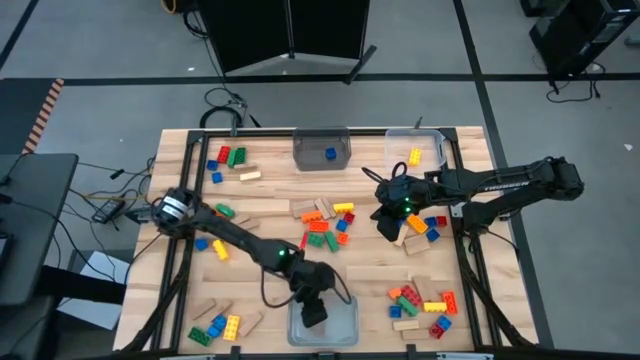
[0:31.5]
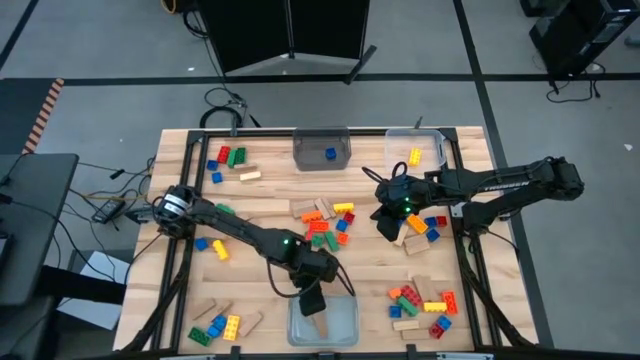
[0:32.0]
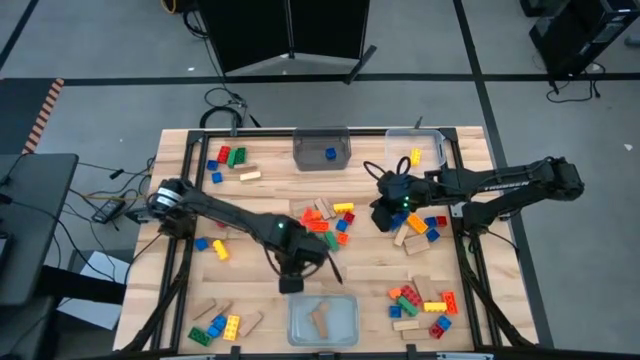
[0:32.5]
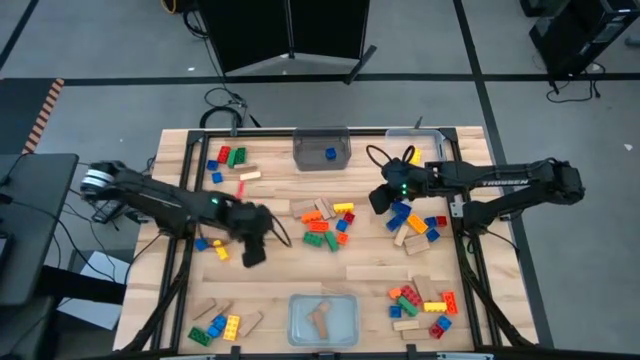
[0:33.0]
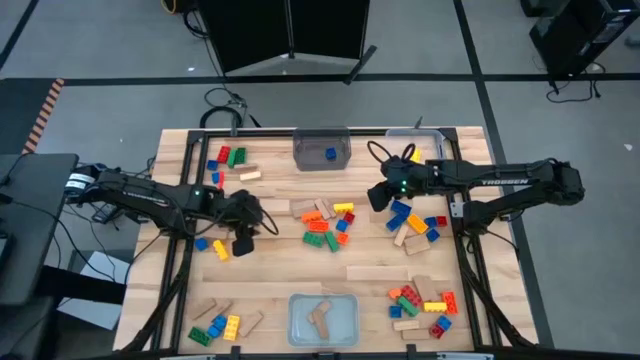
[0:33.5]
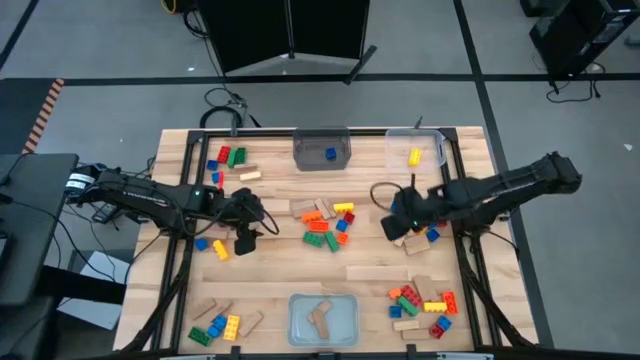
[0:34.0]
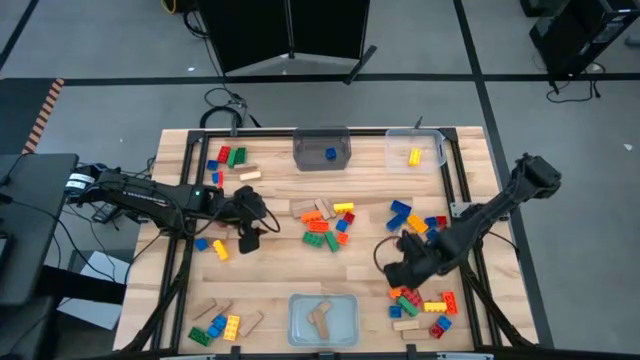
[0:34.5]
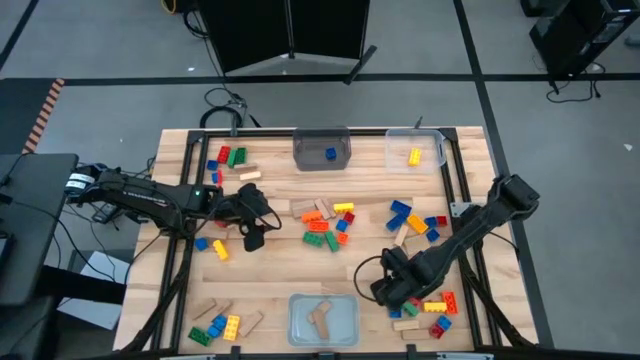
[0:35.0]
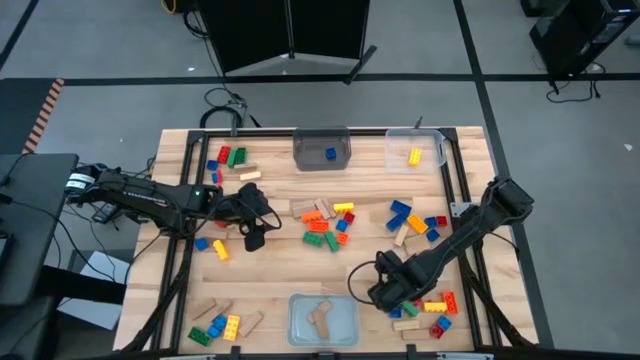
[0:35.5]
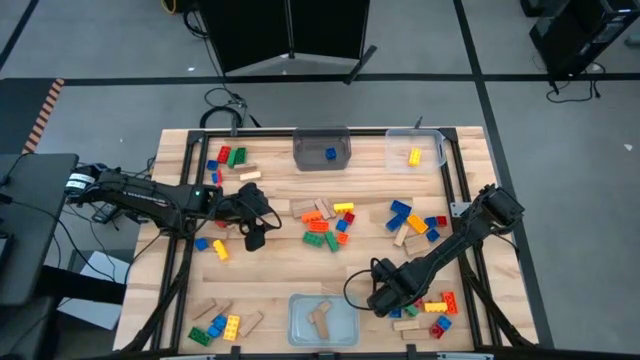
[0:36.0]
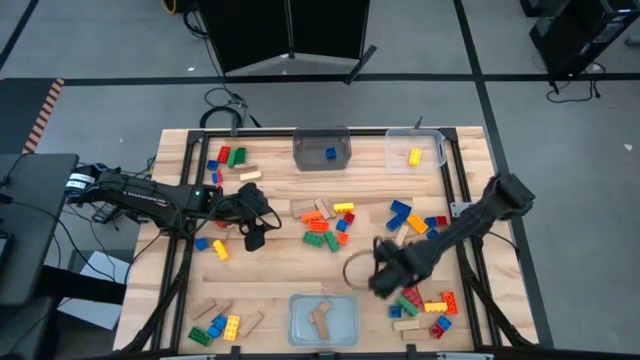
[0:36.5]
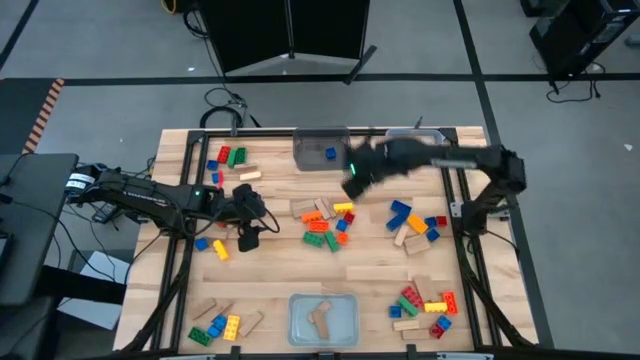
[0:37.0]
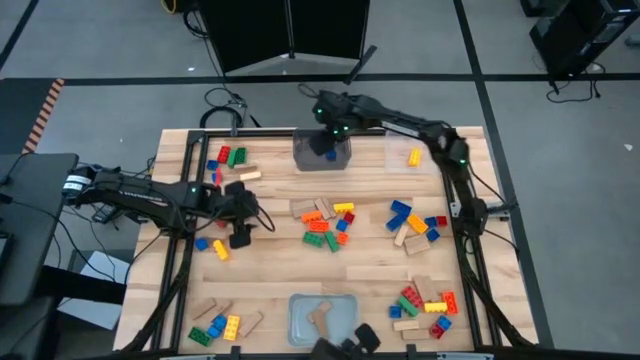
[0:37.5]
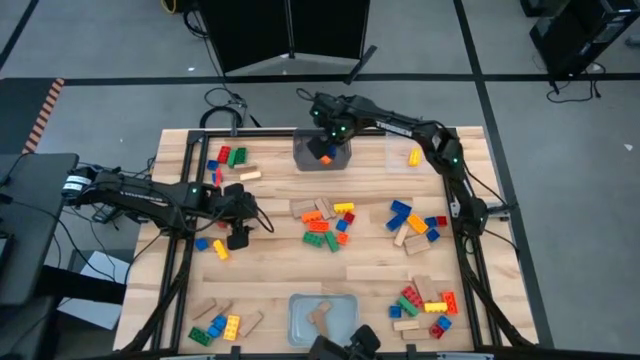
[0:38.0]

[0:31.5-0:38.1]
Task: Sort blocks by size
Put the small orange game piece into the black bin

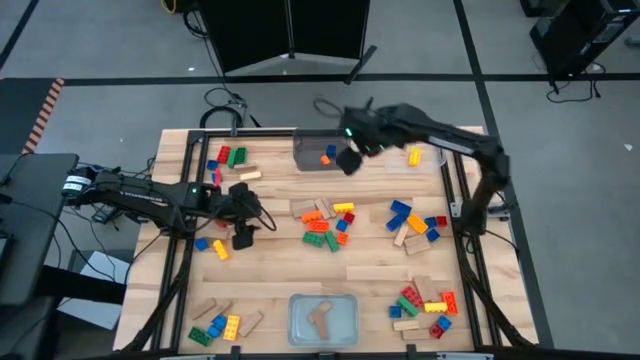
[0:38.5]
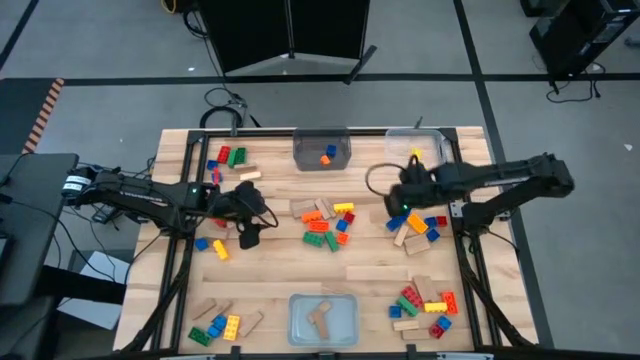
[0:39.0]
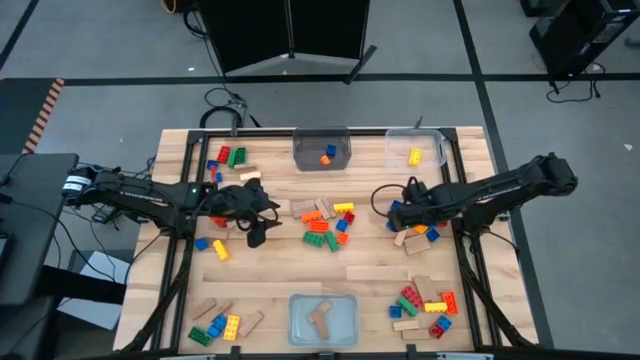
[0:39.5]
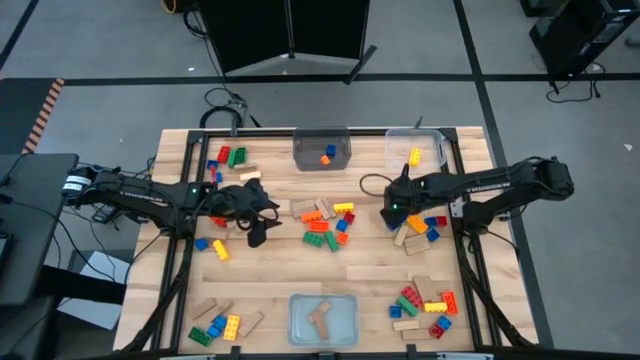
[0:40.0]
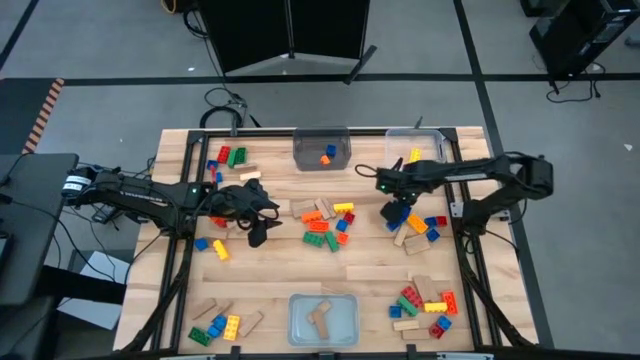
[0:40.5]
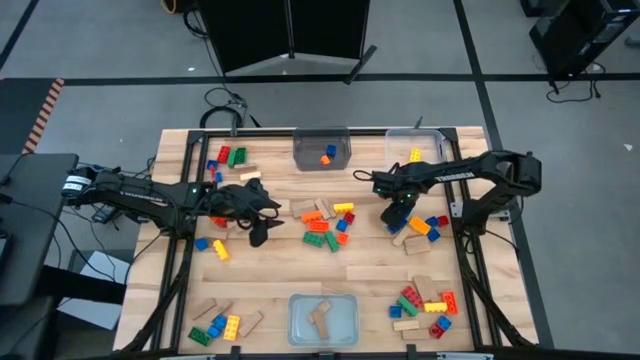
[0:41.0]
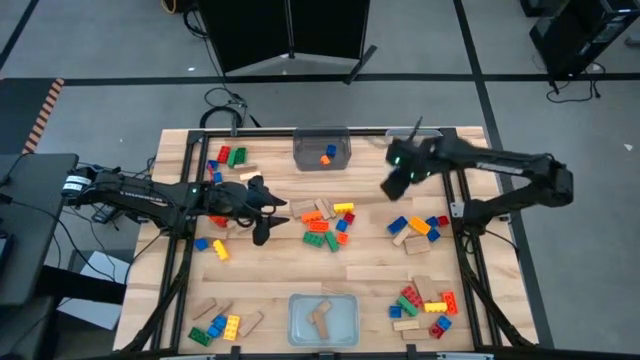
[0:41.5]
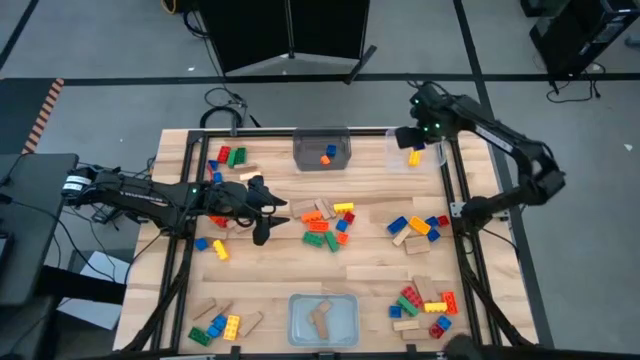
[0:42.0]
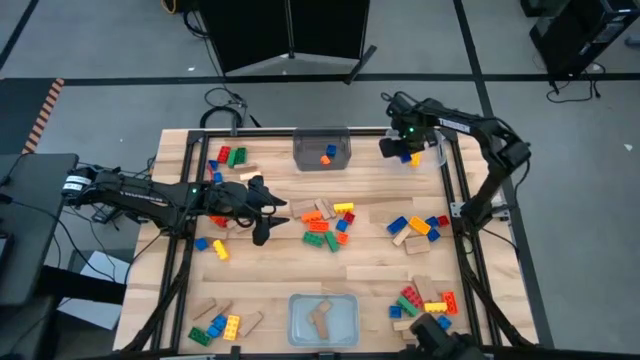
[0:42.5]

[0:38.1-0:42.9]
Put the large blue game piece into the transparent bin

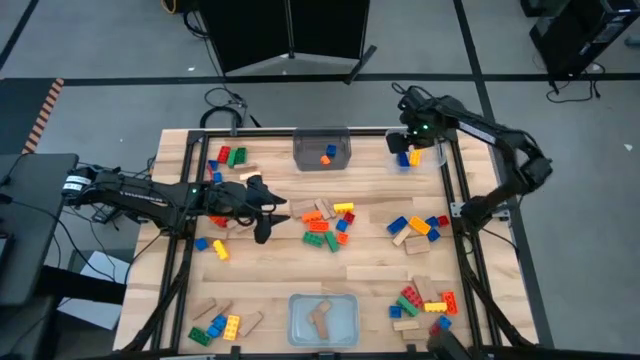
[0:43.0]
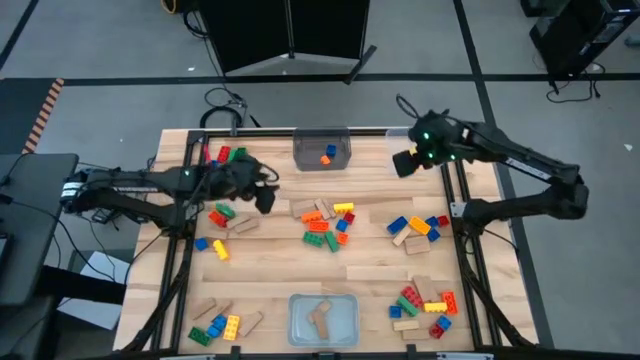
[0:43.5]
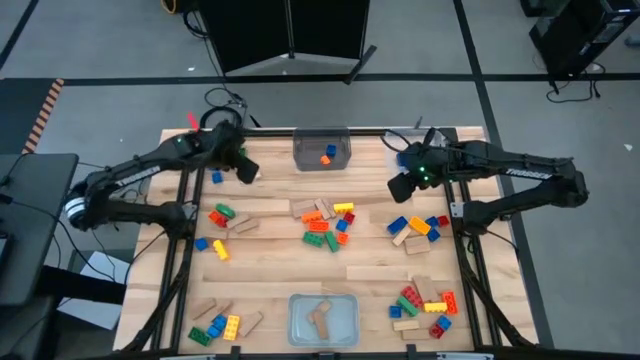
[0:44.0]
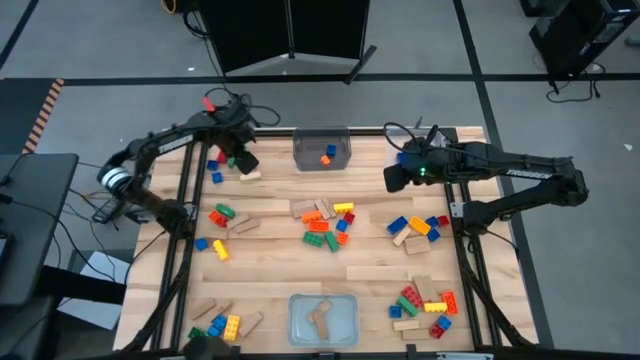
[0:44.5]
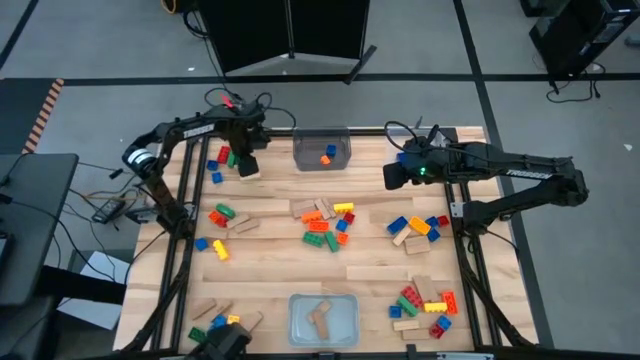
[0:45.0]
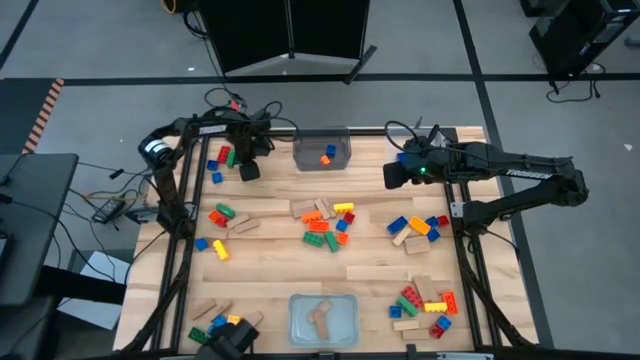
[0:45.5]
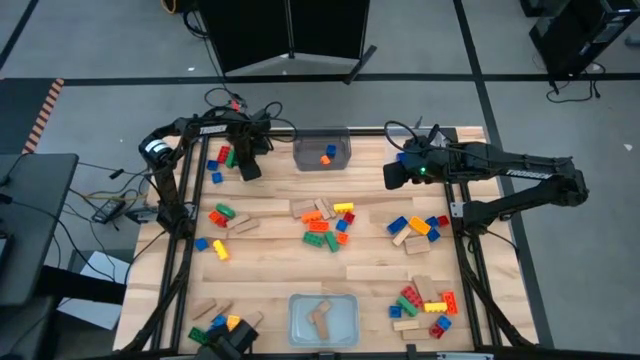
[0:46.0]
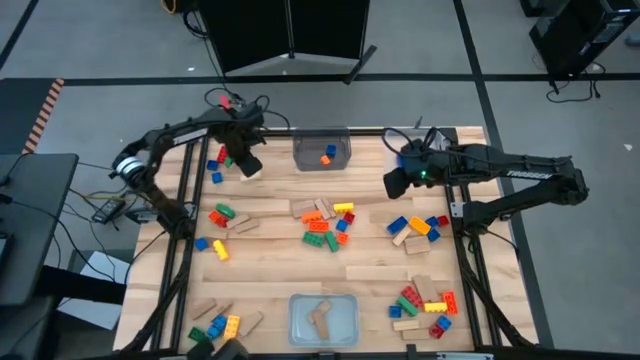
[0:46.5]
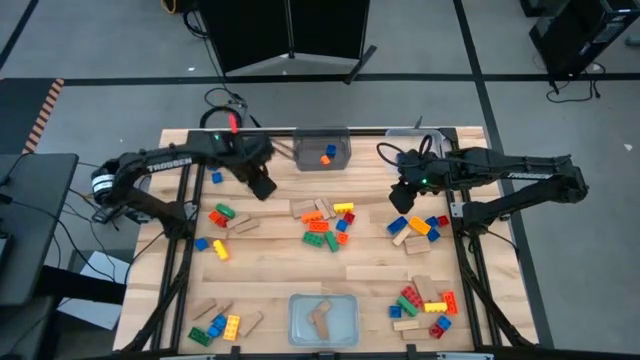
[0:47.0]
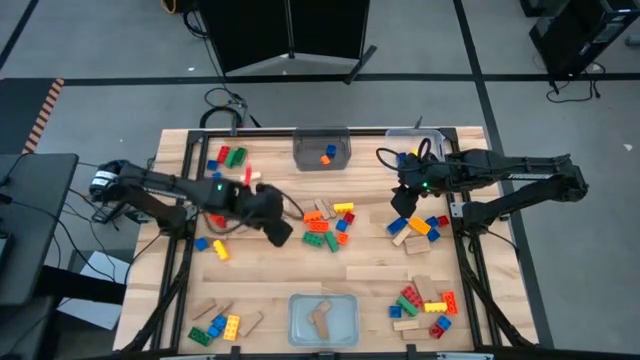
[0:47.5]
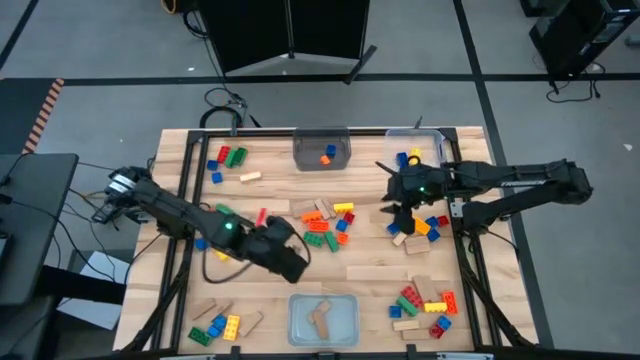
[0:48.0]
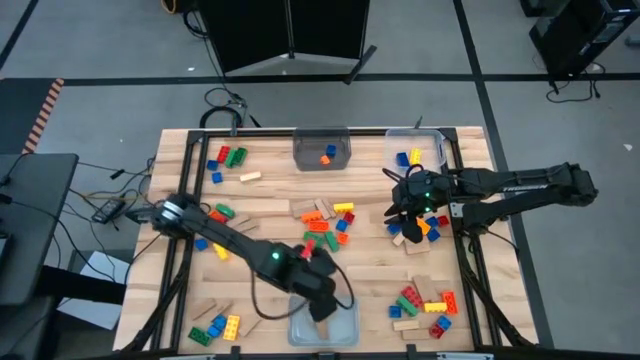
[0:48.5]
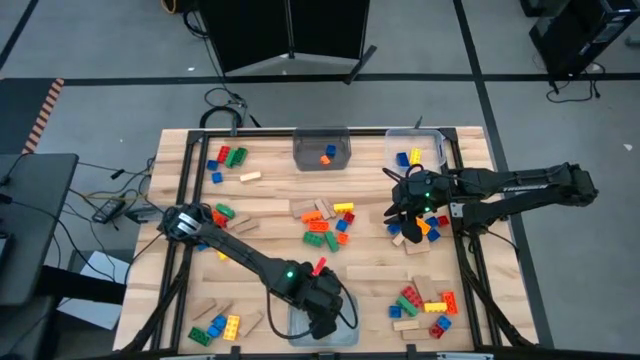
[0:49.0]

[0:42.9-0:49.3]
Put the brown block into the gray bin

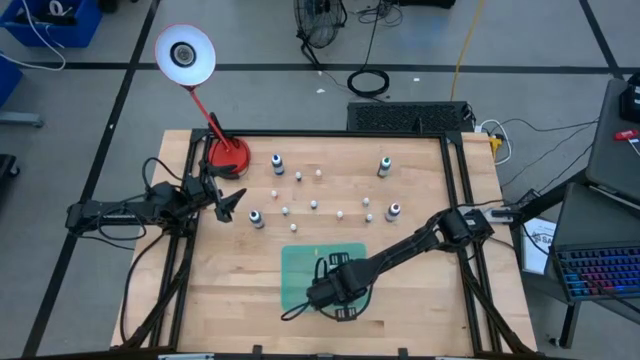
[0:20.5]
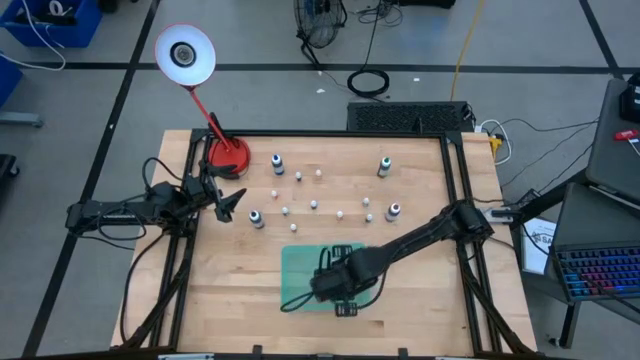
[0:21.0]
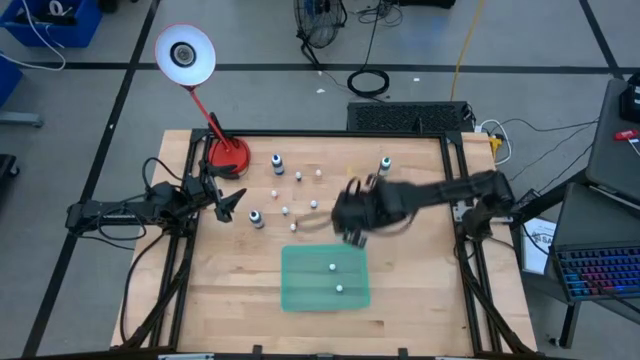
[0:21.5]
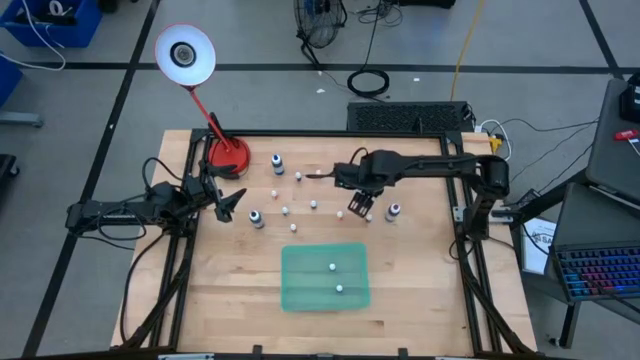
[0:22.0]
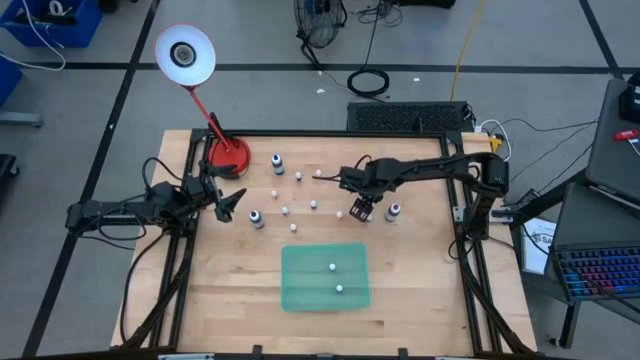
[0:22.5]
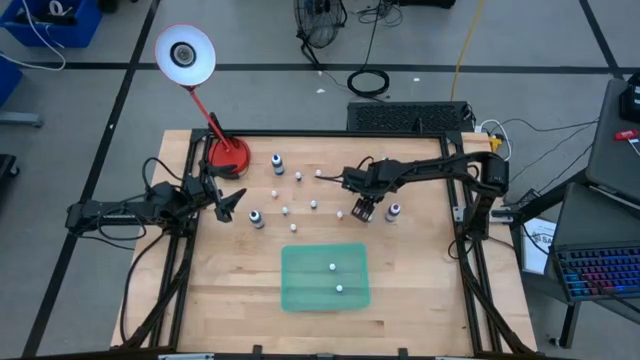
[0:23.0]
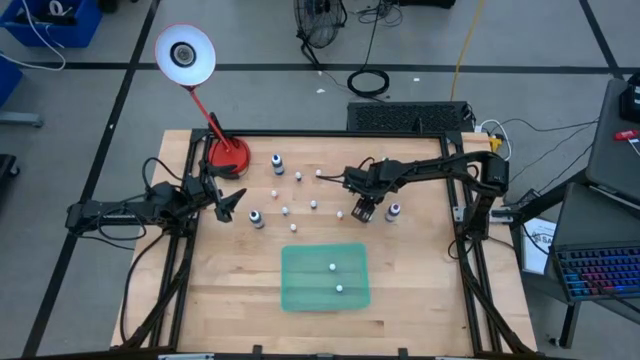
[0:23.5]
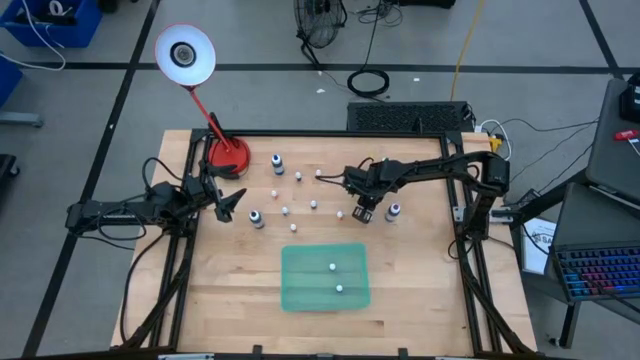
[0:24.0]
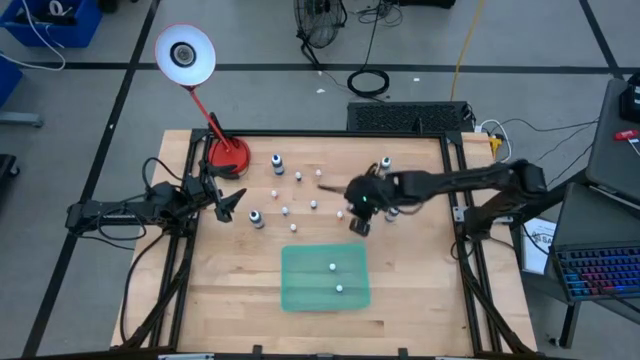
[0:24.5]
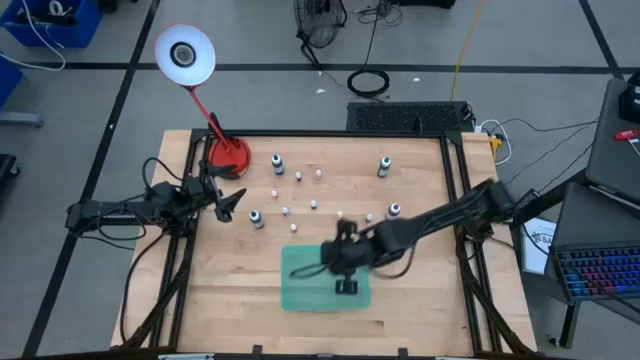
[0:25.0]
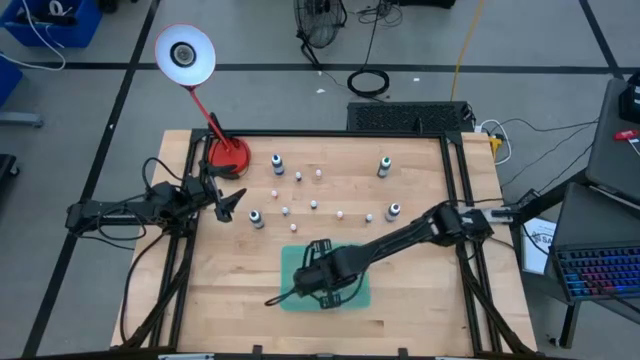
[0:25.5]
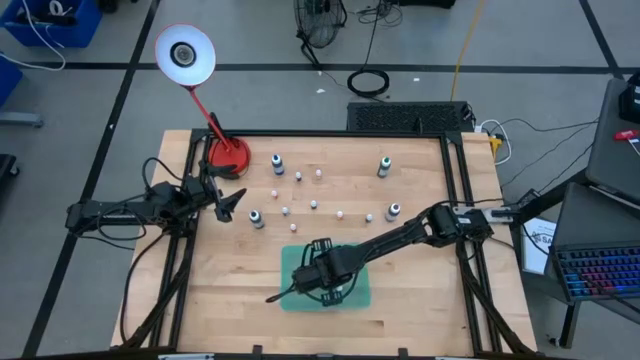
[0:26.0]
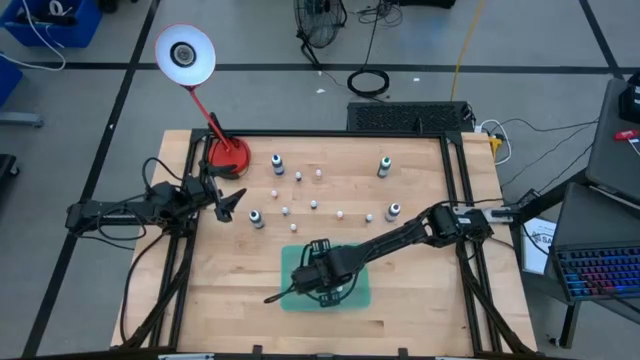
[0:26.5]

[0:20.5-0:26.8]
Task: Pick & Place food coloring
Put the right small purple food coloring bottle into the blue bin
